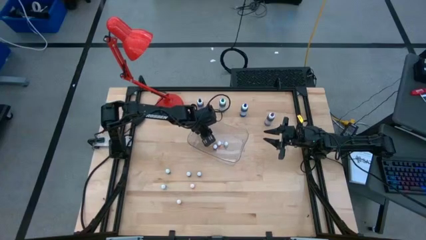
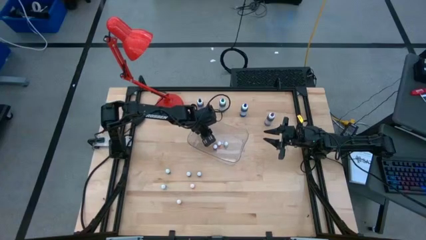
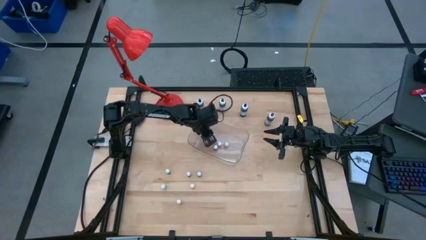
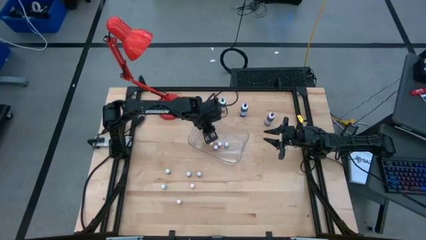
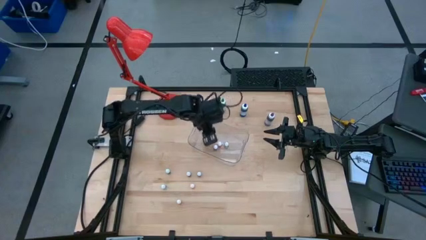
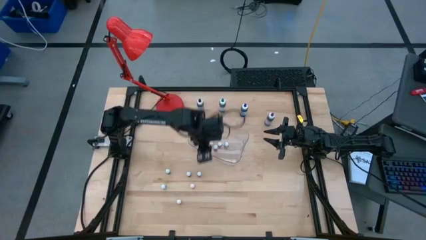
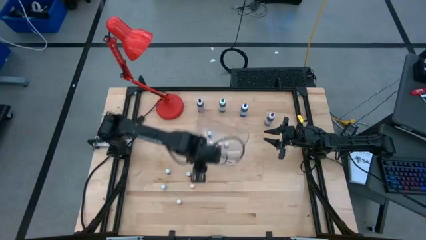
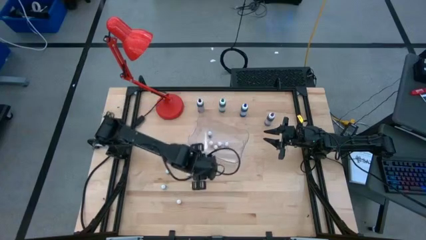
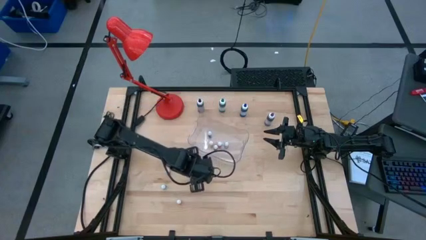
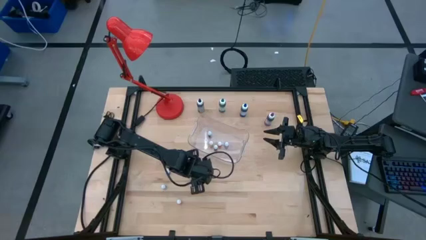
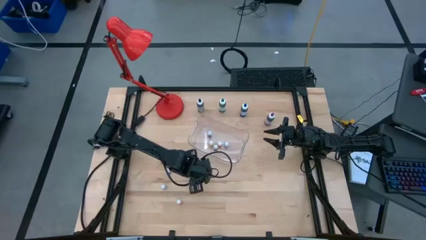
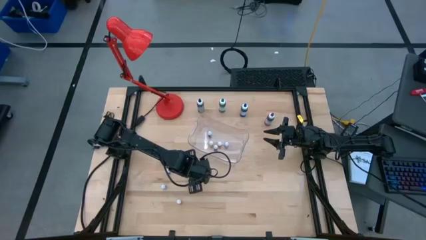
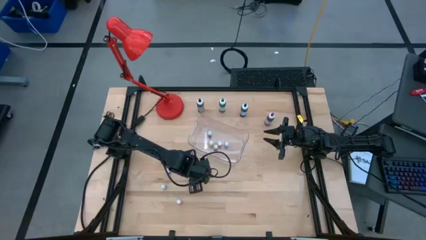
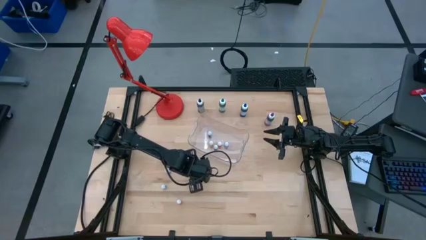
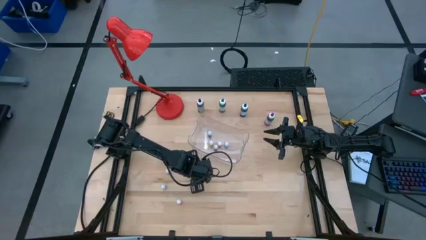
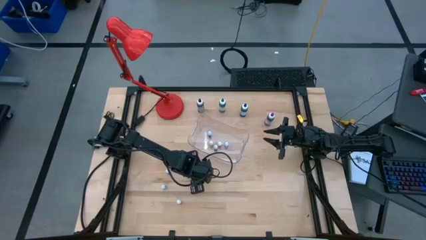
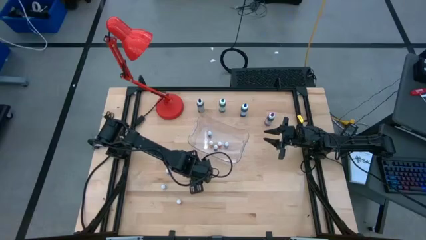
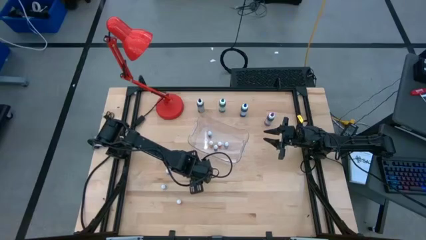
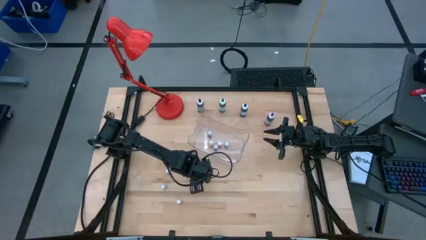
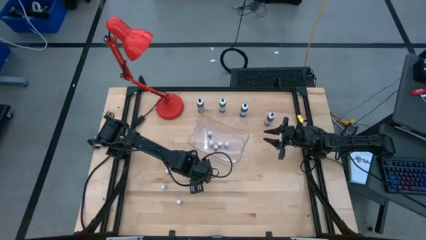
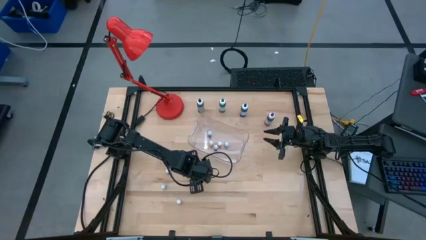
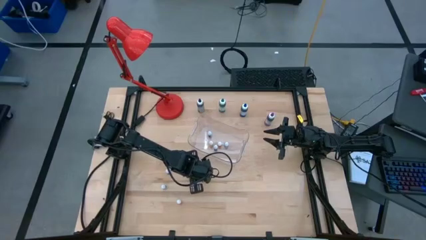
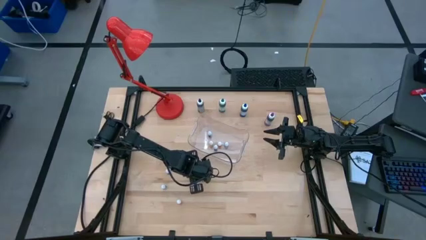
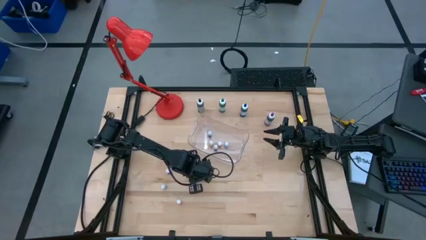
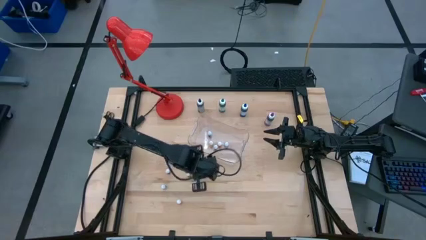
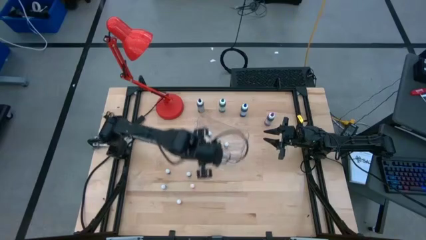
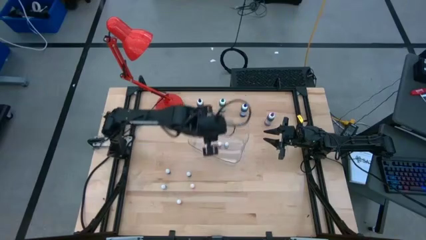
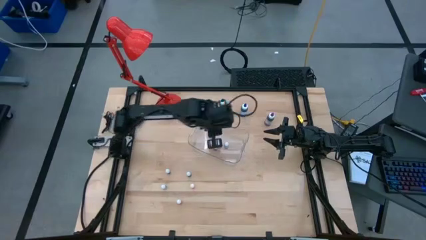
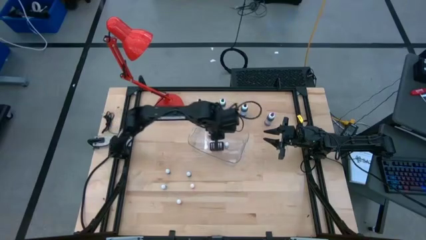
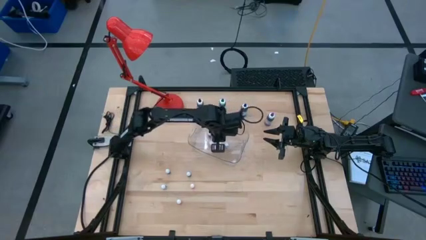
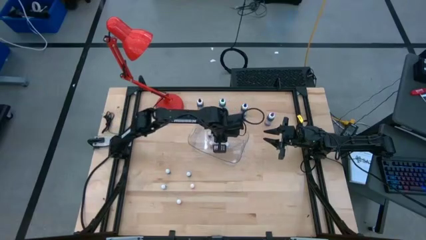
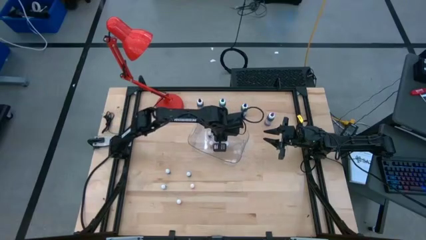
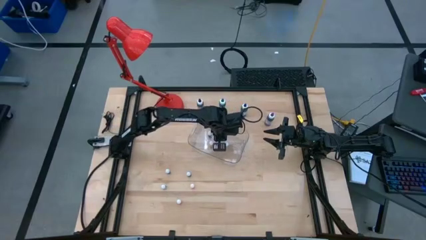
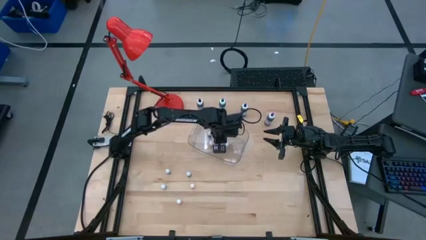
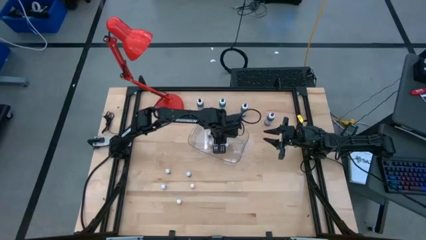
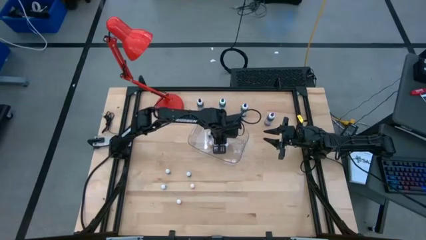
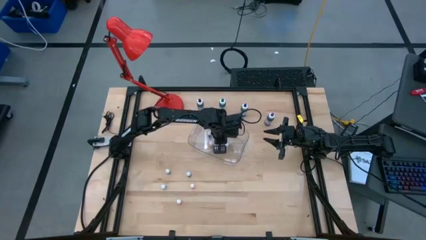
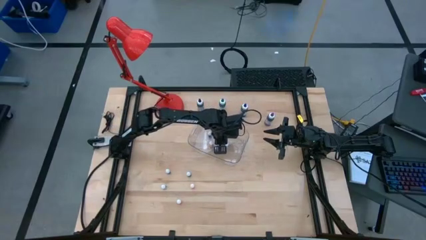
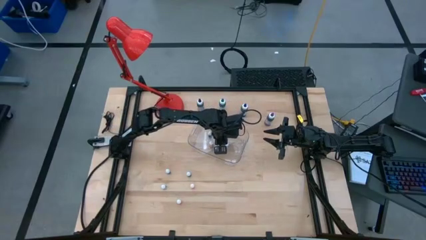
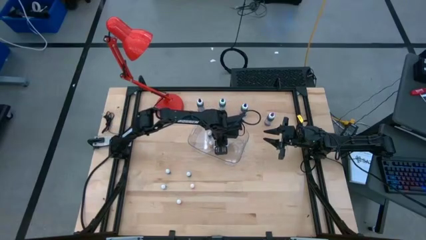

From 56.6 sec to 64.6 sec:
Task: Pick & Place food coloring
Put the small green food coloring bottle in the transparent bin

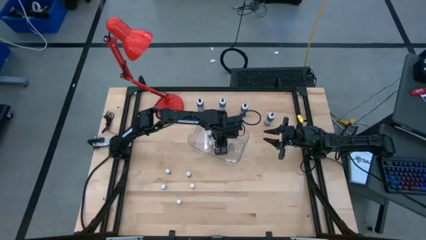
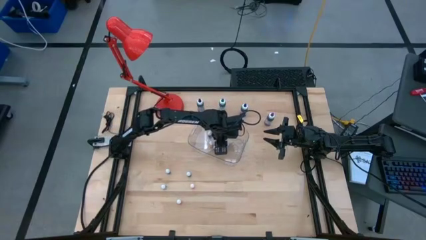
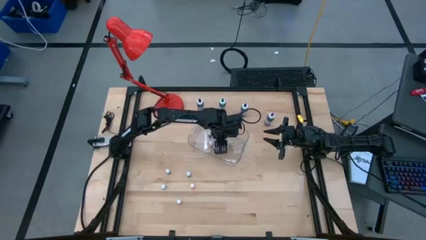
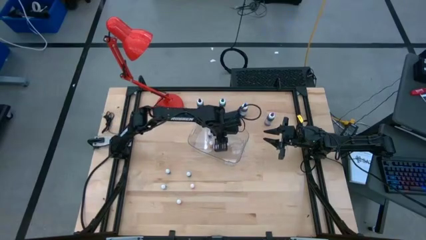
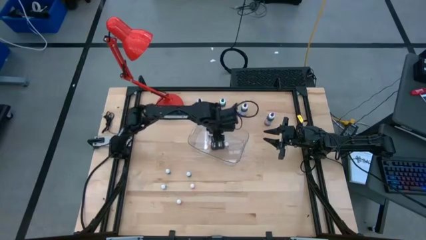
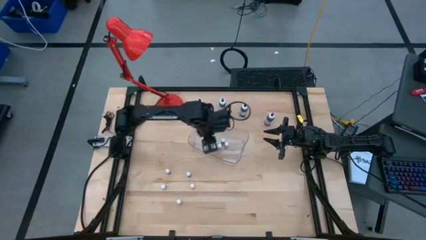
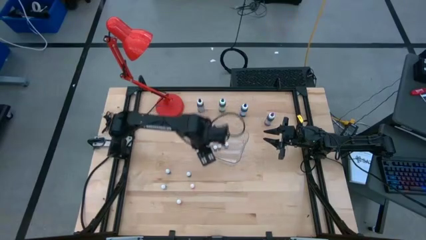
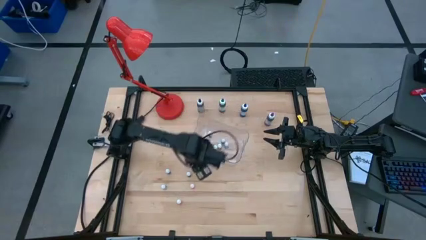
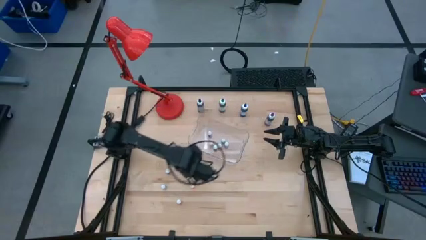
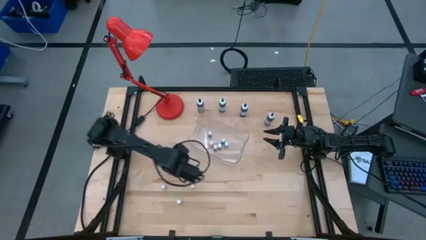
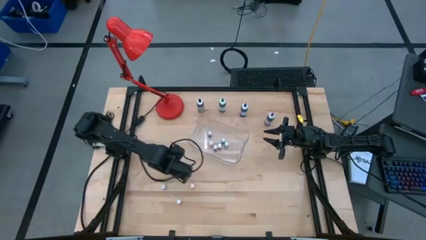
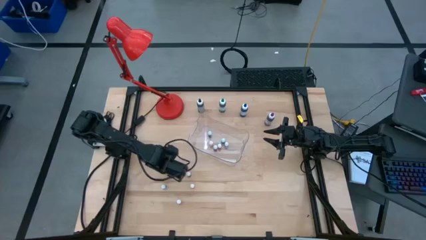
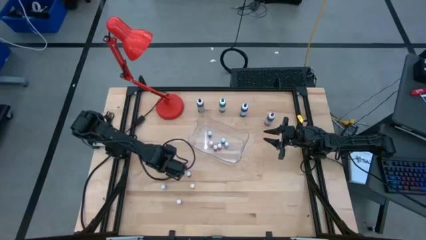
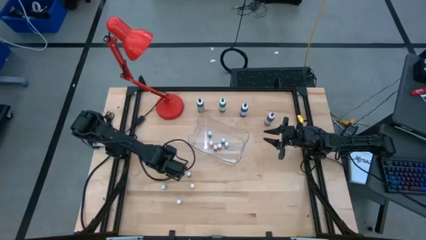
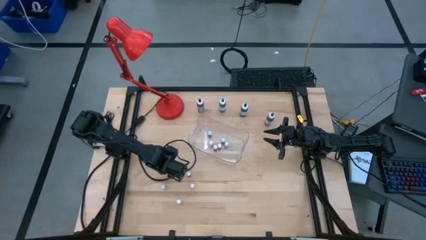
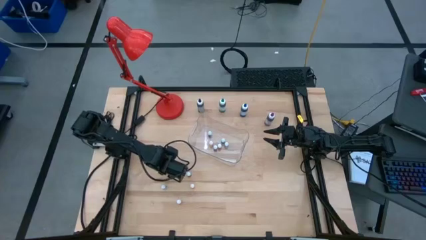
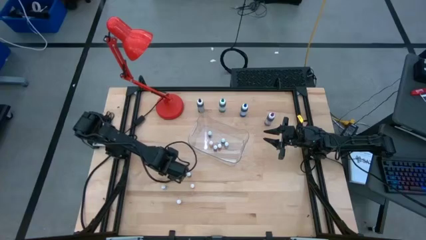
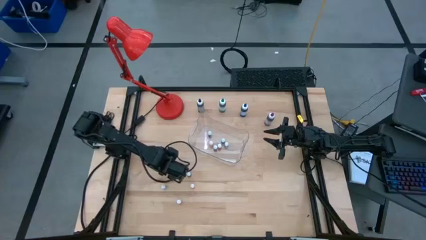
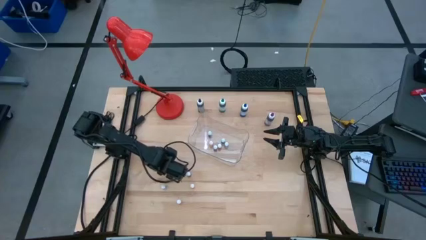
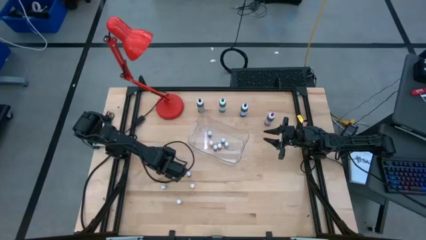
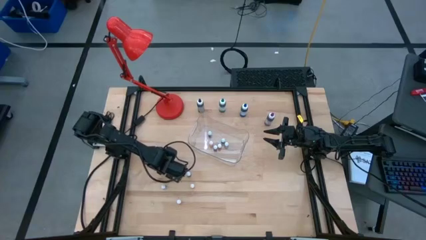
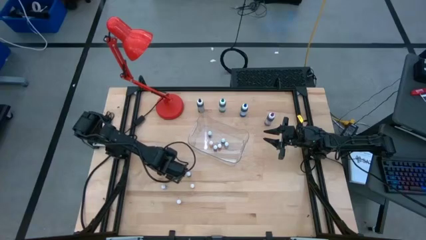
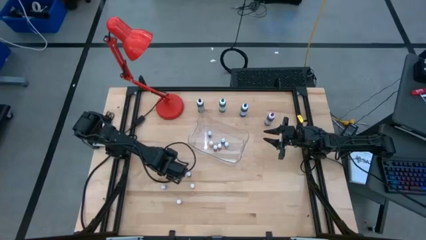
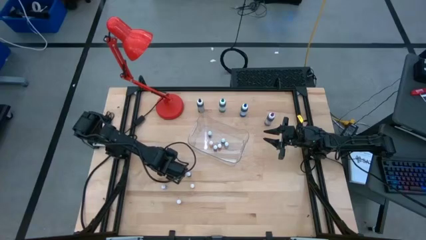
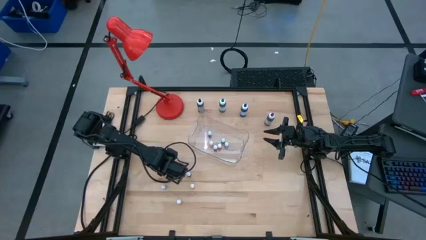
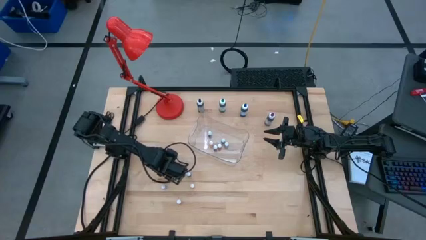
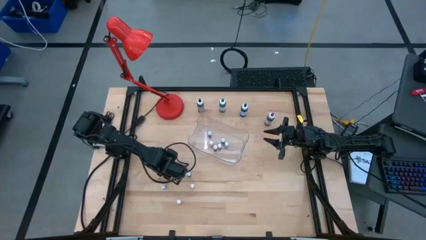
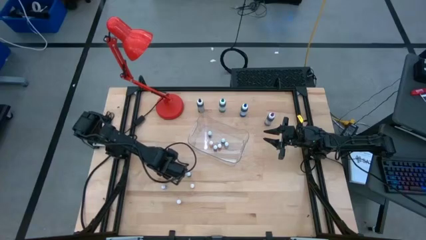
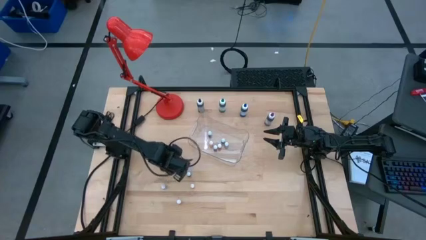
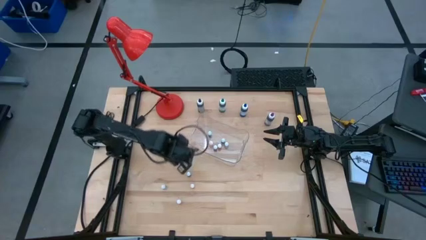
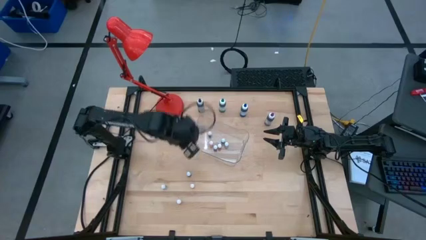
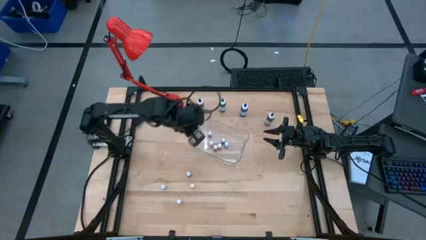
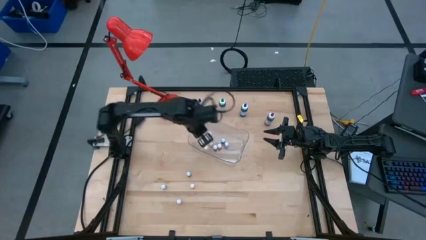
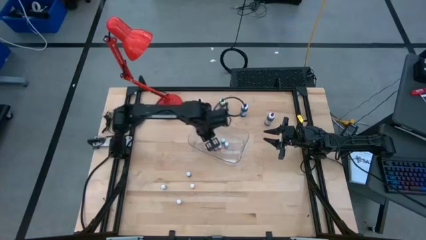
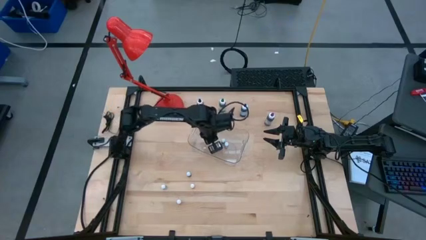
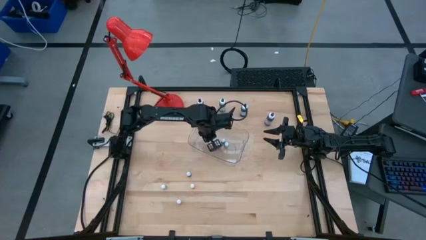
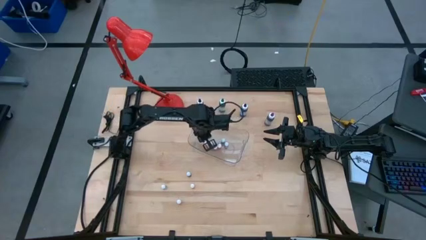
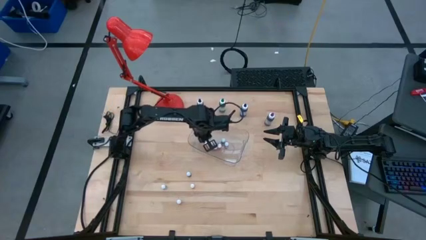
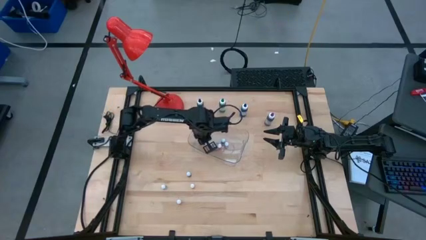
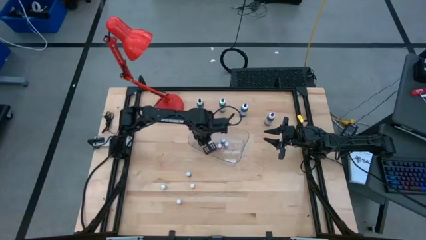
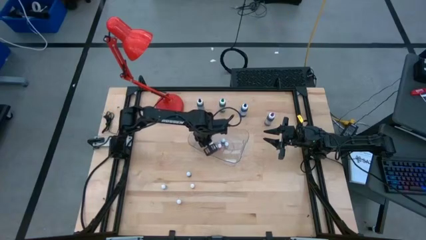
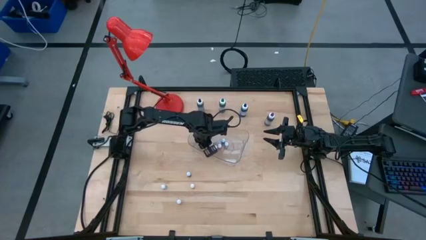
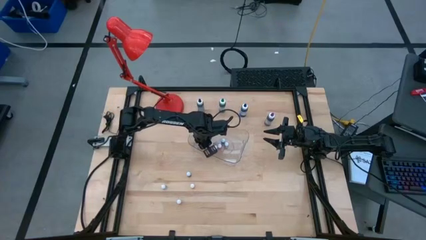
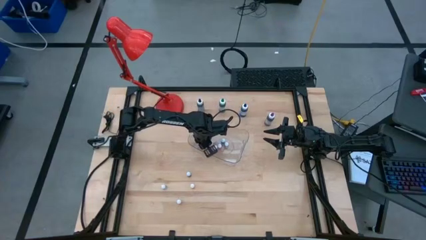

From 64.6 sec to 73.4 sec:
Put the small purple food coloring bottle in the transparent bin
